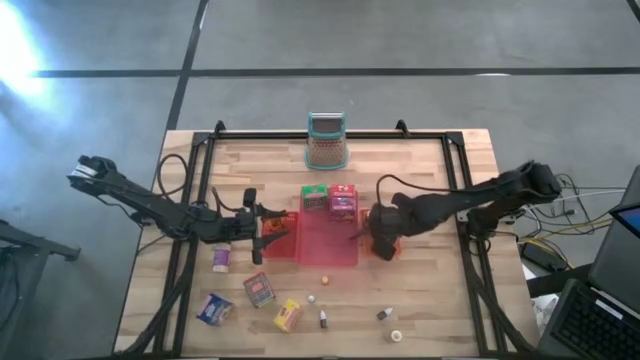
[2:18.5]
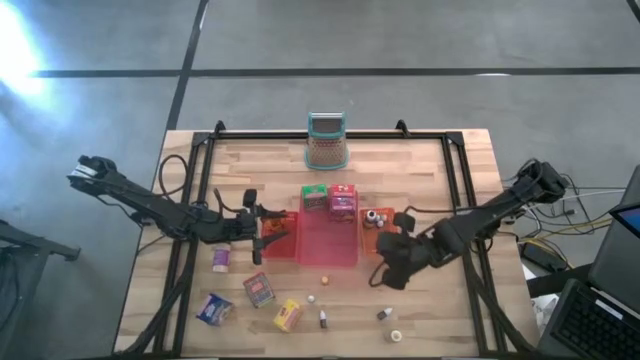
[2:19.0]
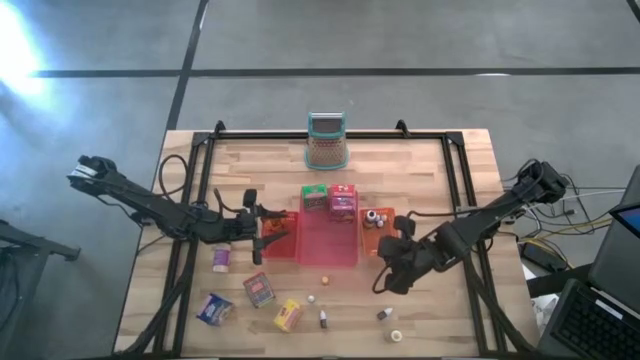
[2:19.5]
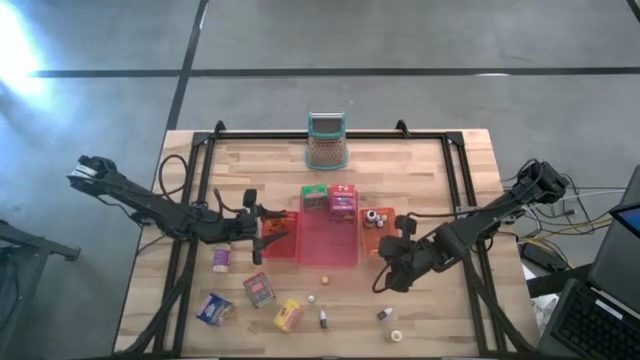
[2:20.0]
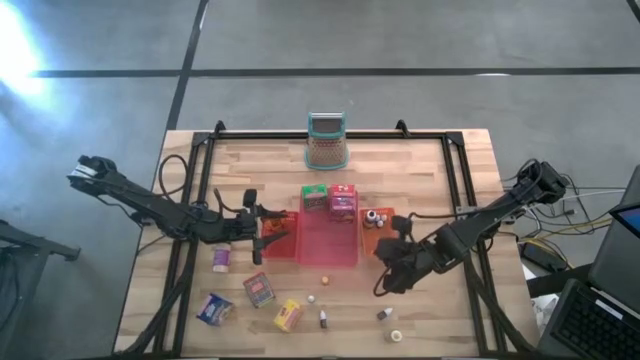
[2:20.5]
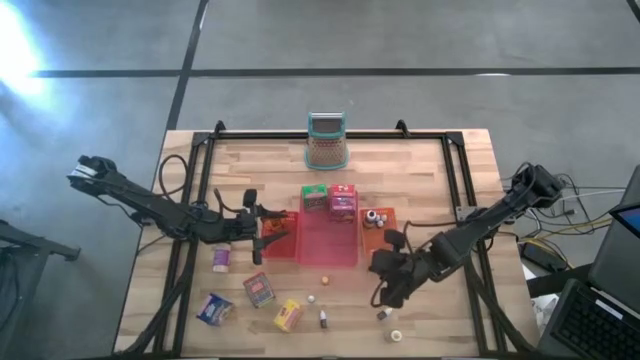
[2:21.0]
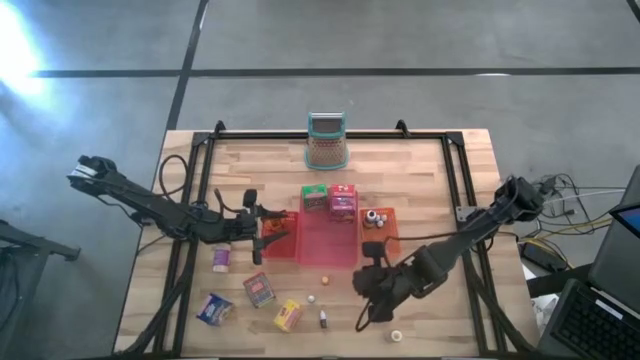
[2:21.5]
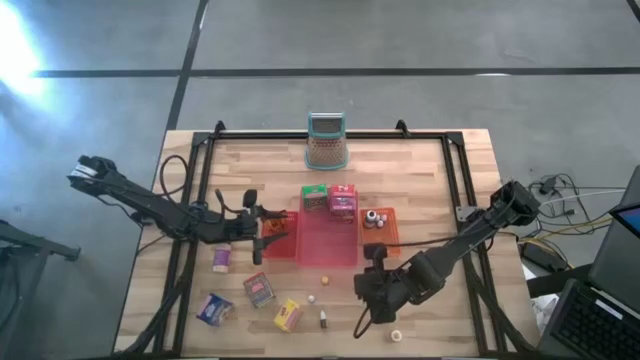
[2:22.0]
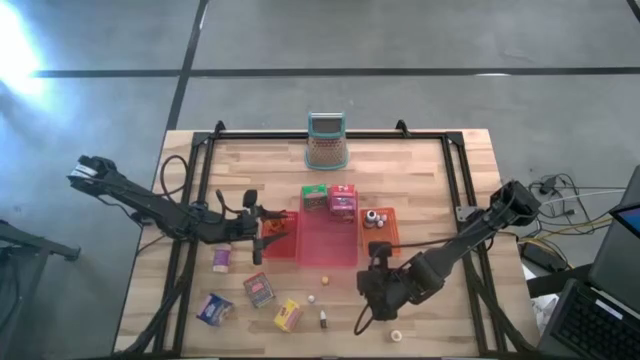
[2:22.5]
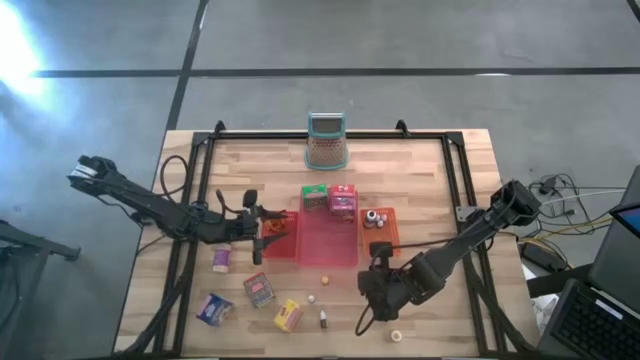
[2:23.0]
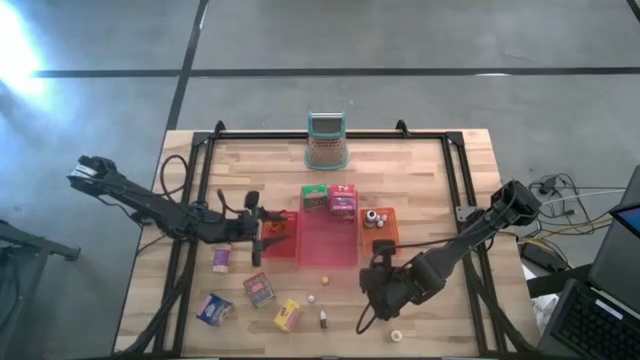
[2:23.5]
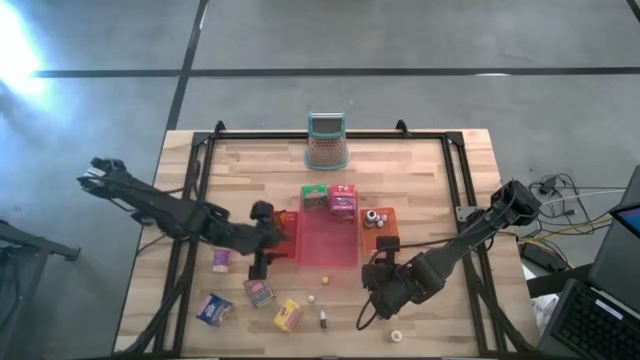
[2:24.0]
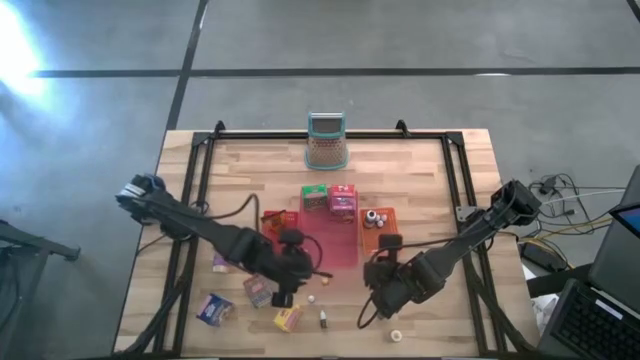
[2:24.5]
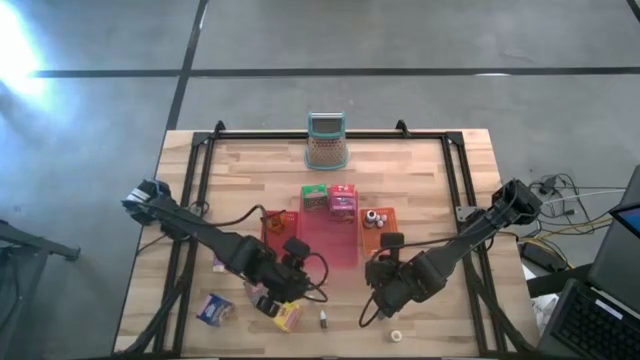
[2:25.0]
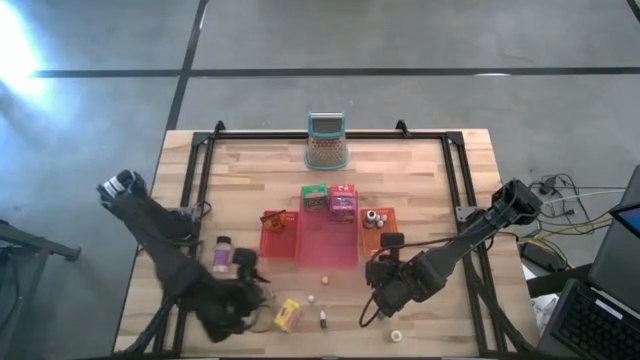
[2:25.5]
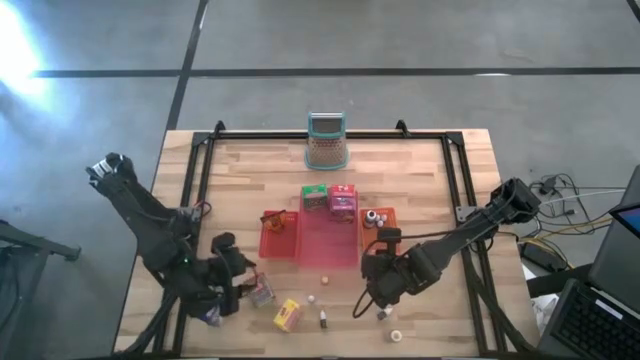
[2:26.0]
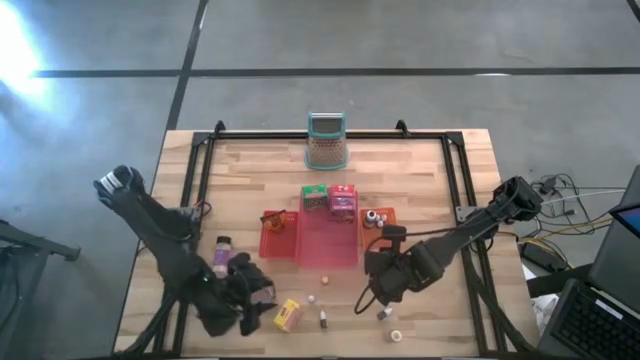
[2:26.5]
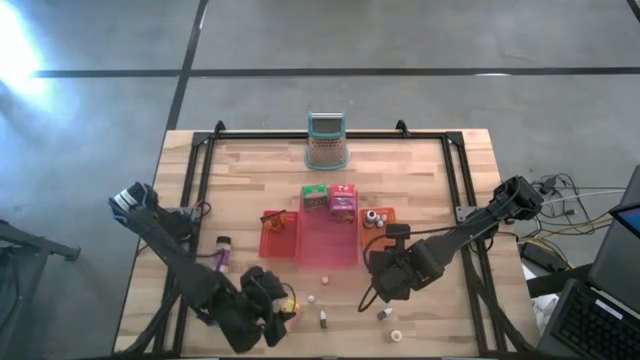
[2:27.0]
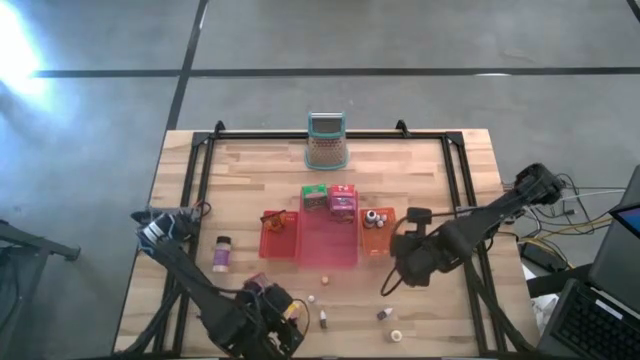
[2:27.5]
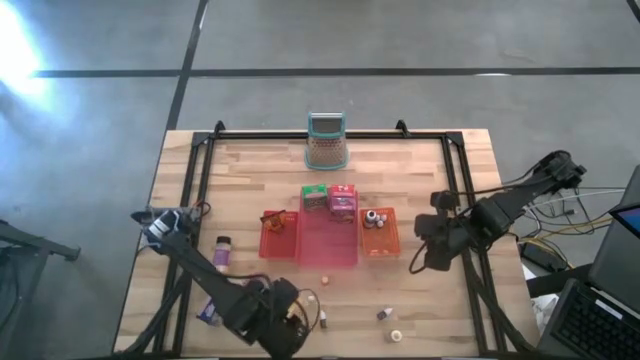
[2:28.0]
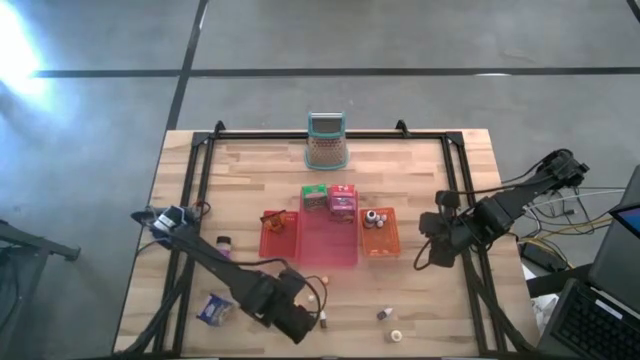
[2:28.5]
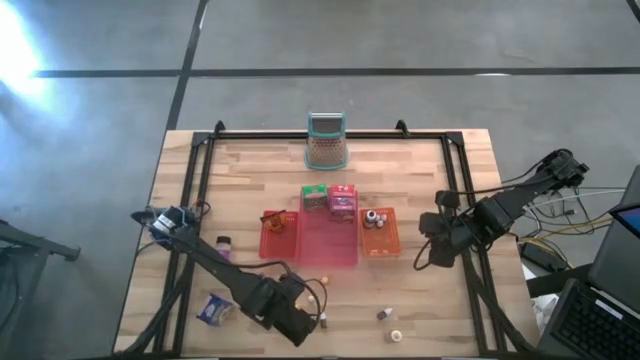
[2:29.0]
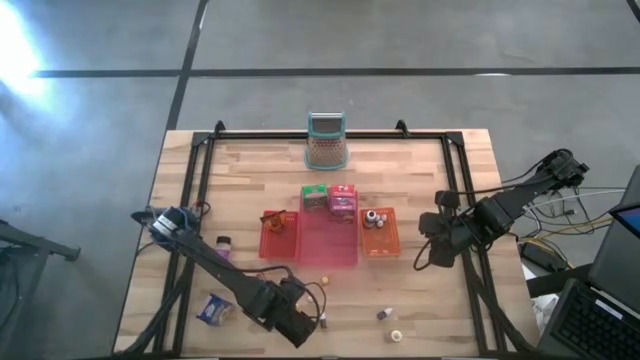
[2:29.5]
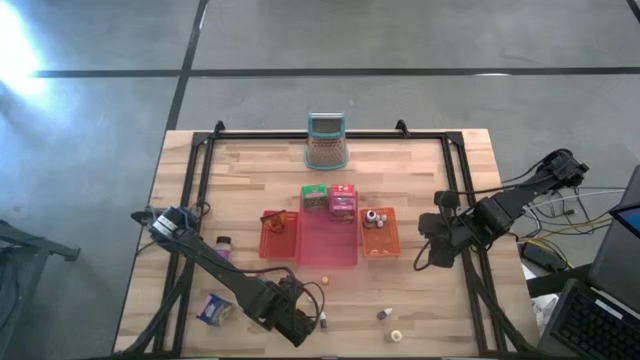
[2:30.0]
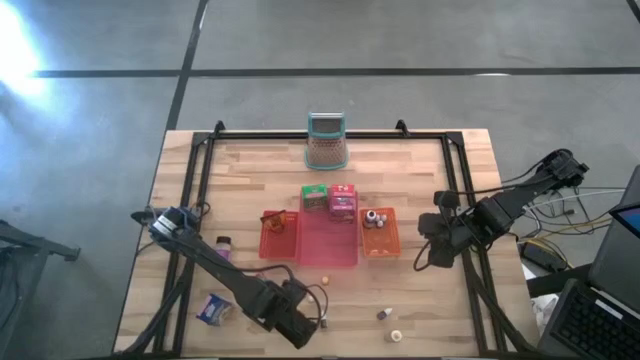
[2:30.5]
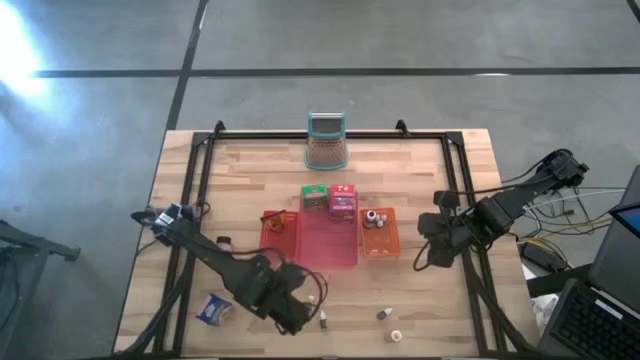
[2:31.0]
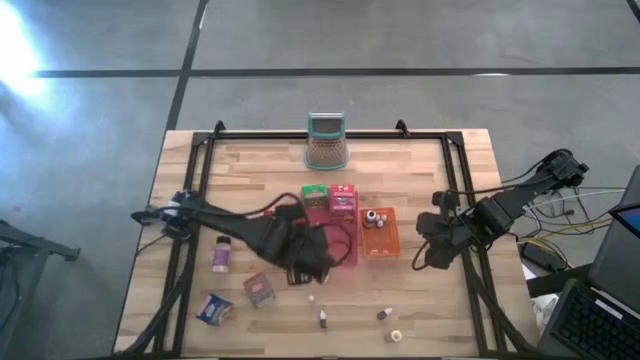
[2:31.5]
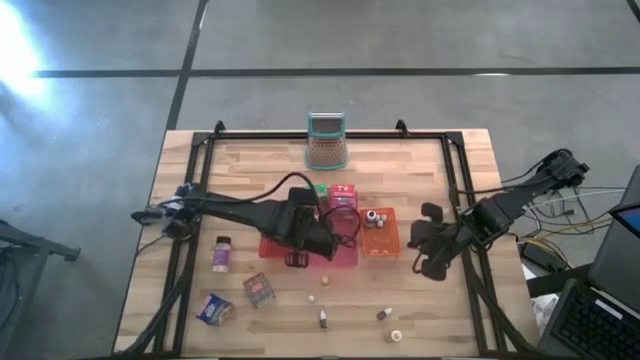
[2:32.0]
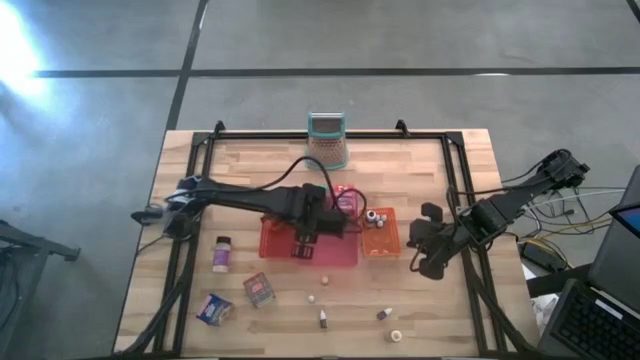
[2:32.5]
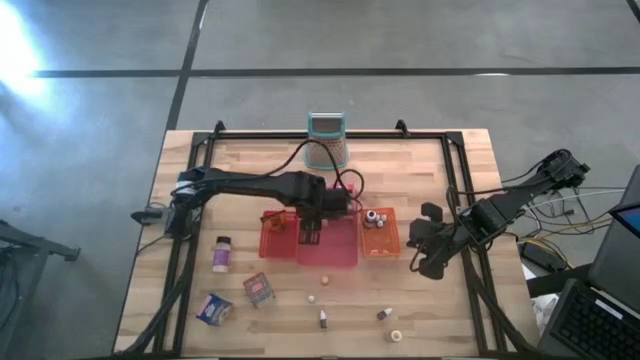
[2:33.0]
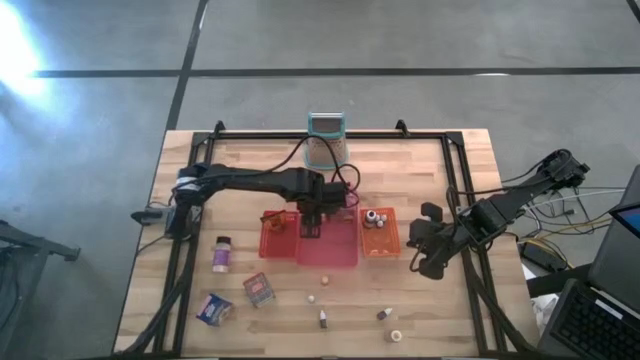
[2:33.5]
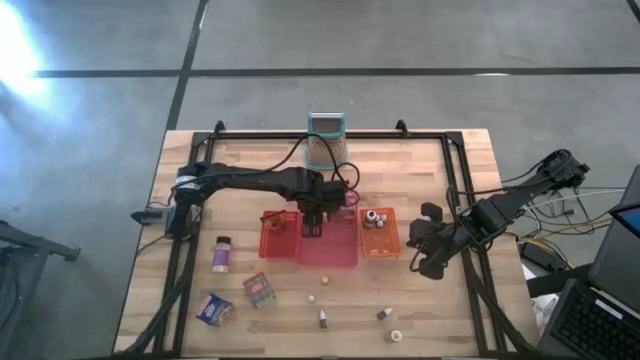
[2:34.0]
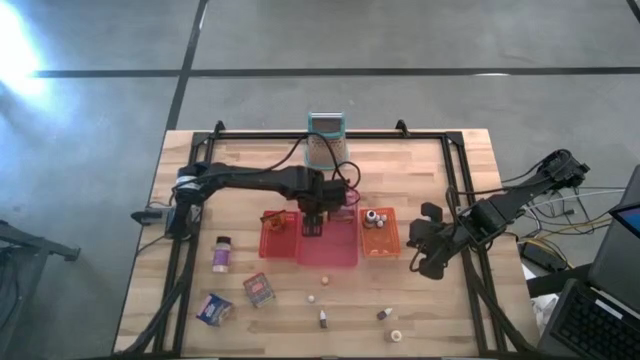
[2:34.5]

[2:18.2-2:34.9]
Task: Pick & Place Kitchen Items
Put the yellow cereal box into the pink bin

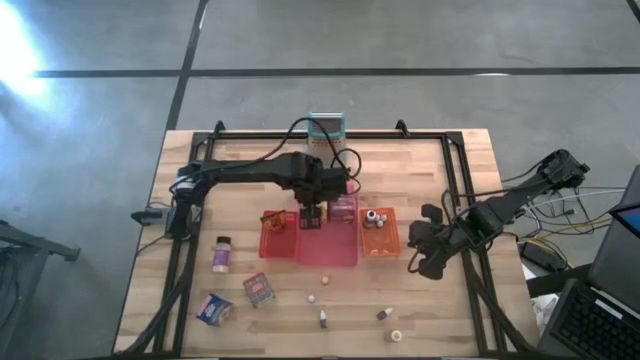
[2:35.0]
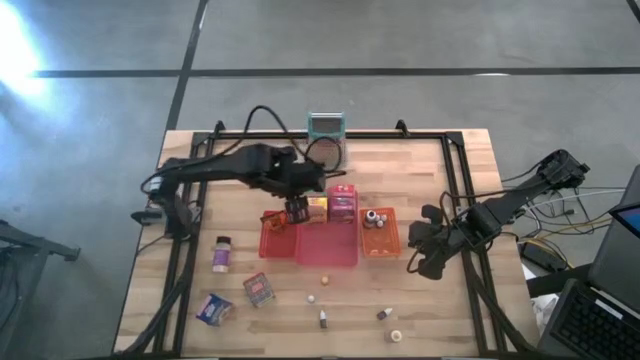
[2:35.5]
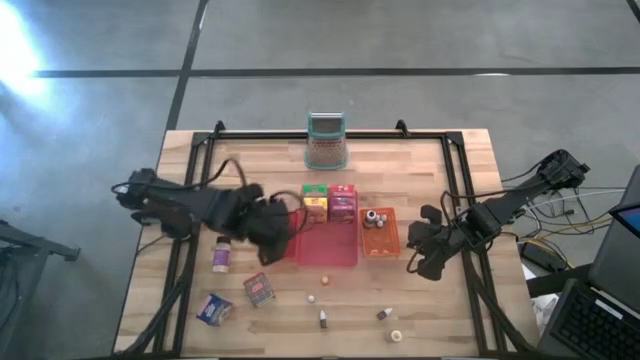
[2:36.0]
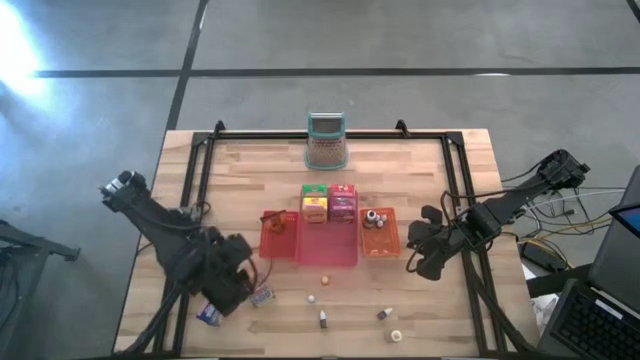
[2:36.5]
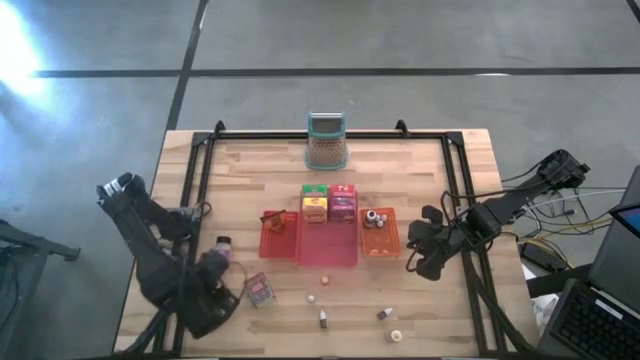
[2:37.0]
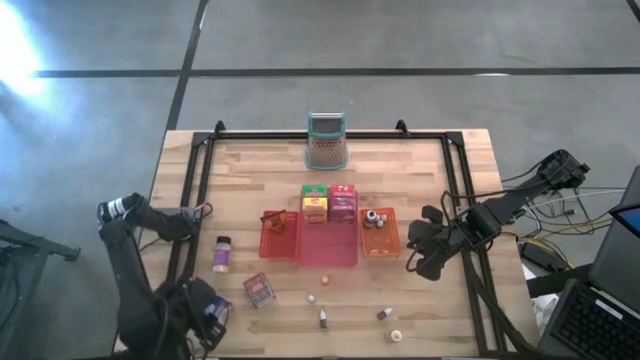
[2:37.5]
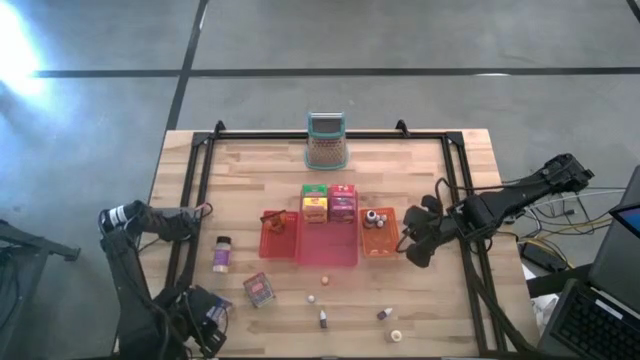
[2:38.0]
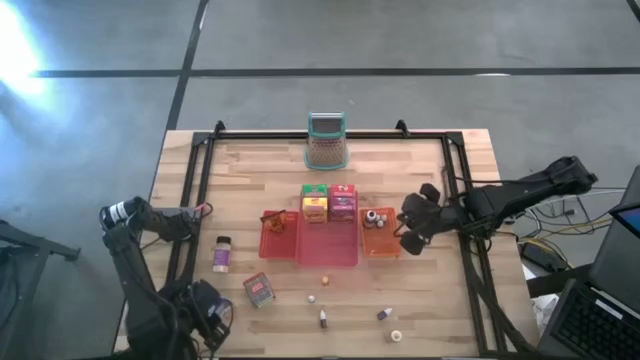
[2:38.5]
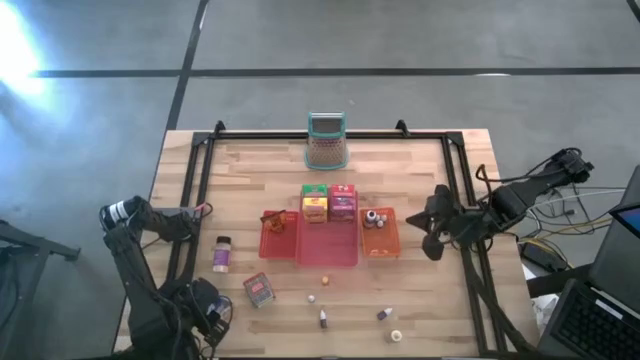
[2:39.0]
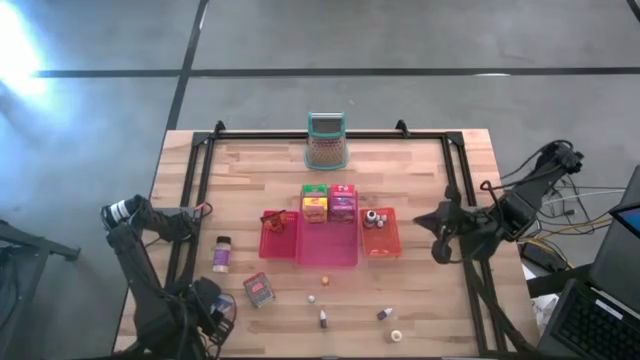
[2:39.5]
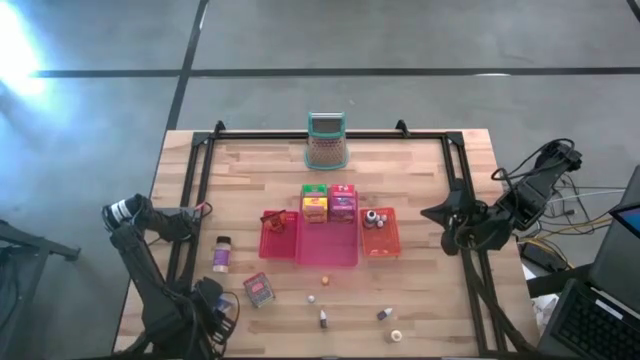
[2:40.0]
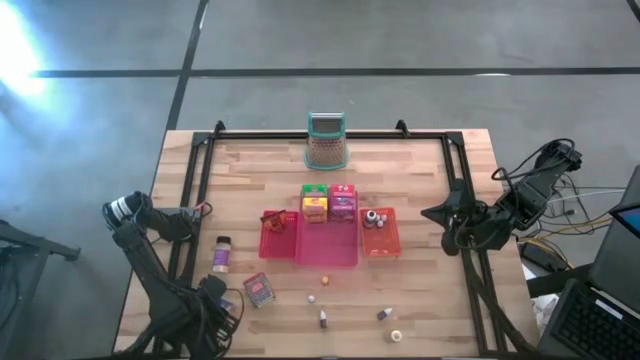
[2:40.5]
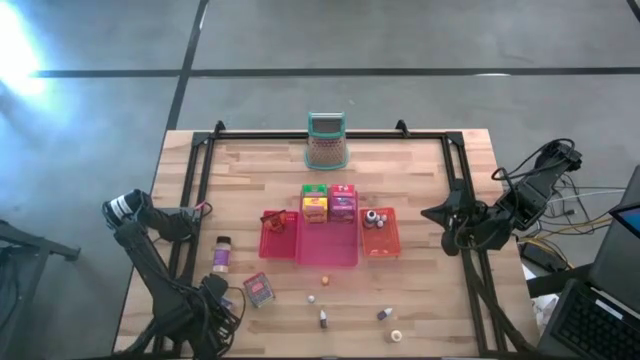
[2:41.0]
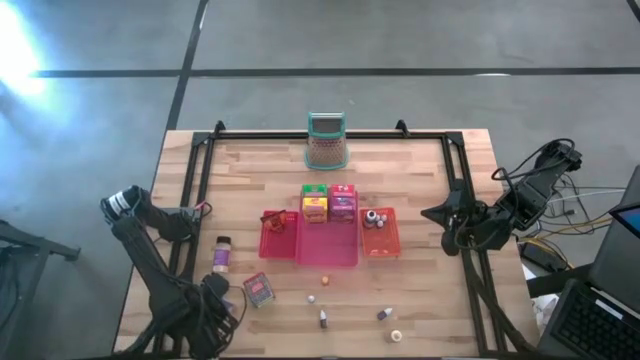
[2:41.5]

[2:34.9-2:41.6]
Put the blue cereal box into the pink bin
